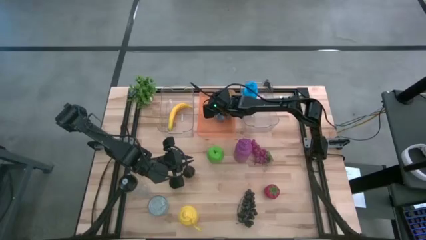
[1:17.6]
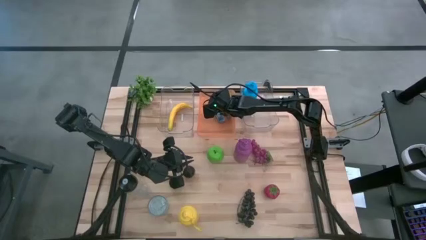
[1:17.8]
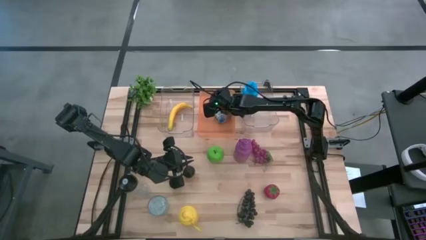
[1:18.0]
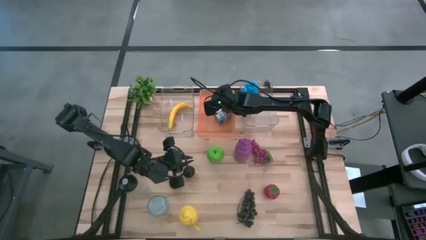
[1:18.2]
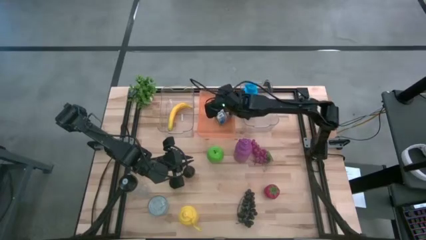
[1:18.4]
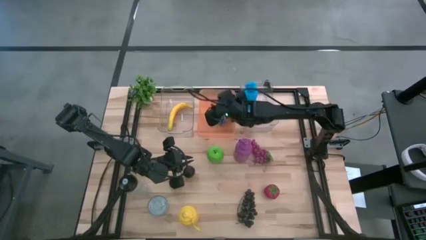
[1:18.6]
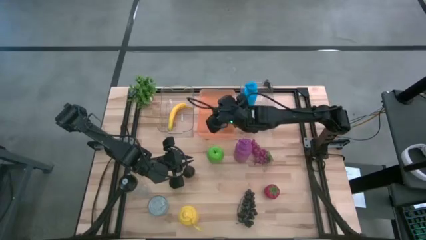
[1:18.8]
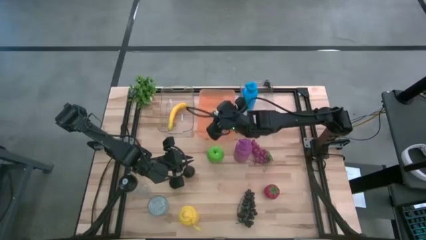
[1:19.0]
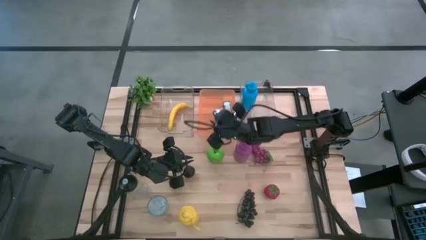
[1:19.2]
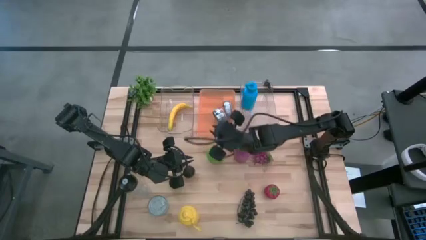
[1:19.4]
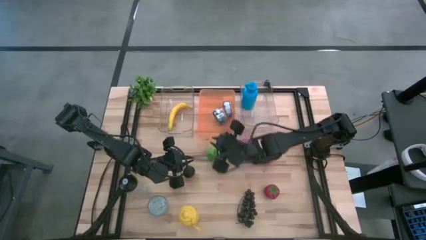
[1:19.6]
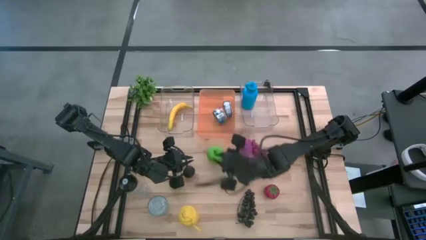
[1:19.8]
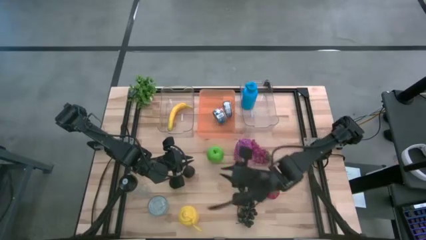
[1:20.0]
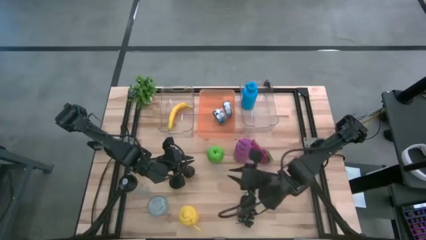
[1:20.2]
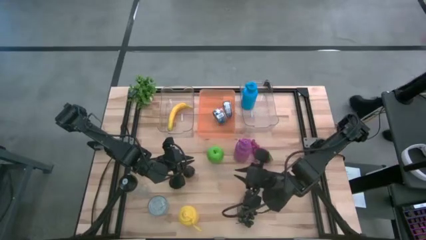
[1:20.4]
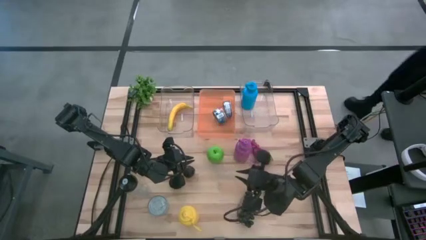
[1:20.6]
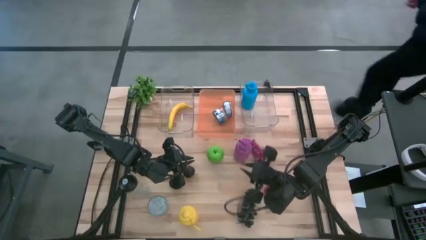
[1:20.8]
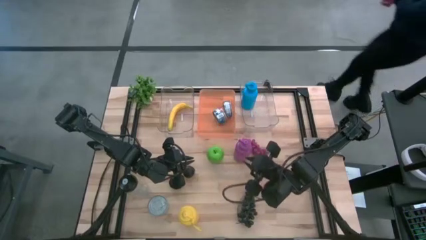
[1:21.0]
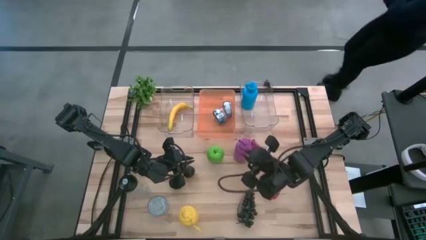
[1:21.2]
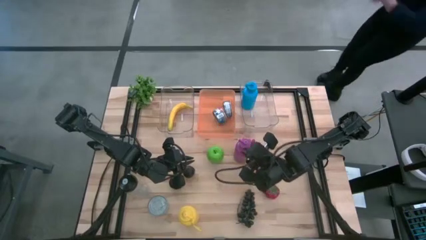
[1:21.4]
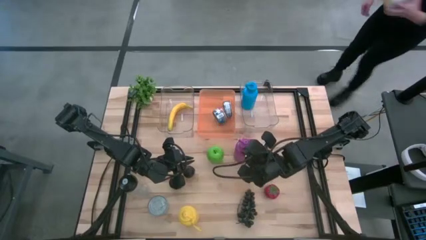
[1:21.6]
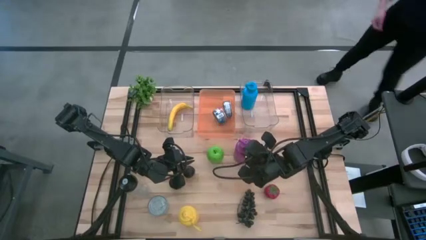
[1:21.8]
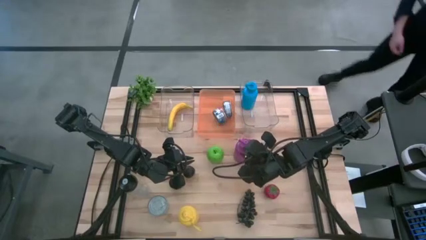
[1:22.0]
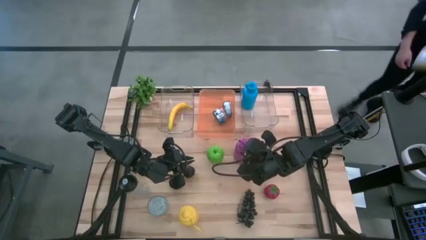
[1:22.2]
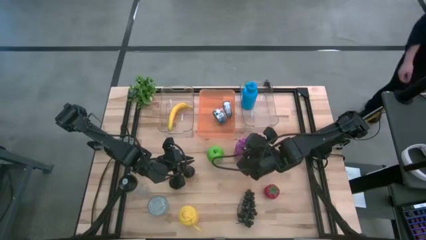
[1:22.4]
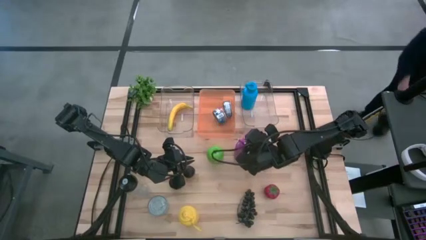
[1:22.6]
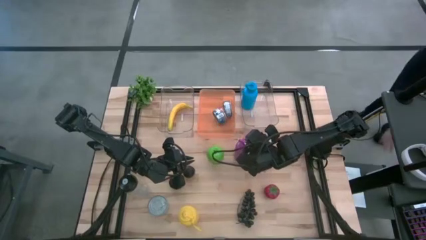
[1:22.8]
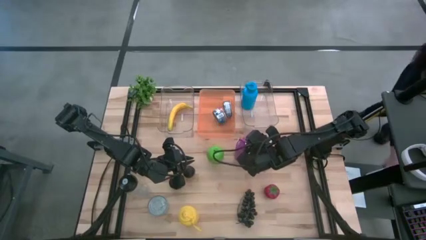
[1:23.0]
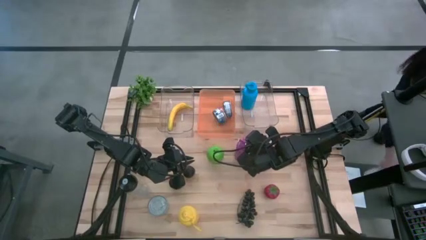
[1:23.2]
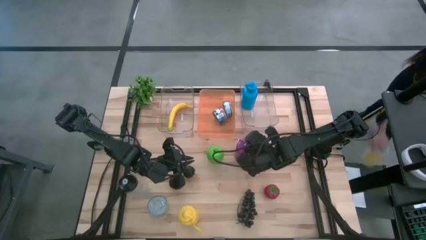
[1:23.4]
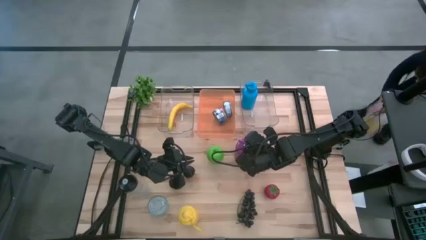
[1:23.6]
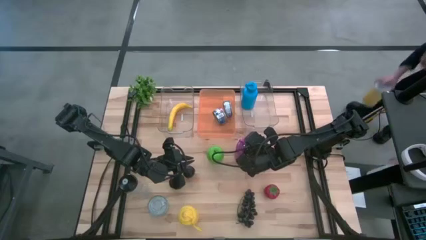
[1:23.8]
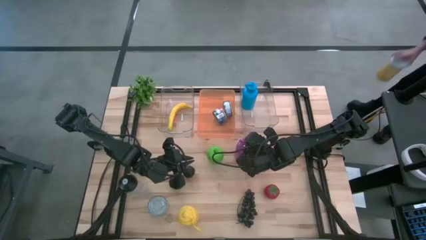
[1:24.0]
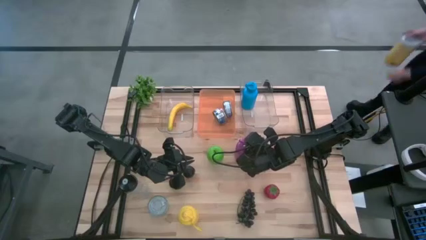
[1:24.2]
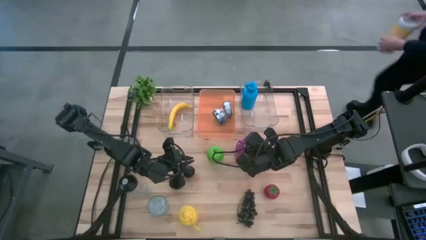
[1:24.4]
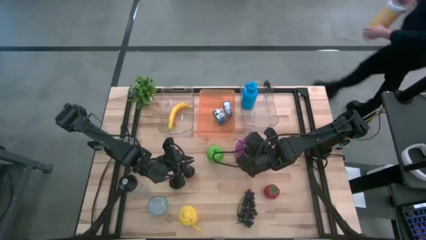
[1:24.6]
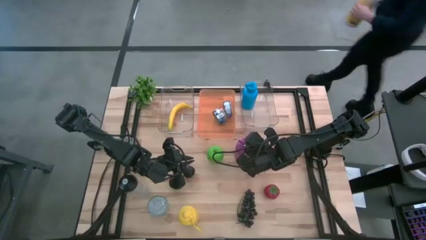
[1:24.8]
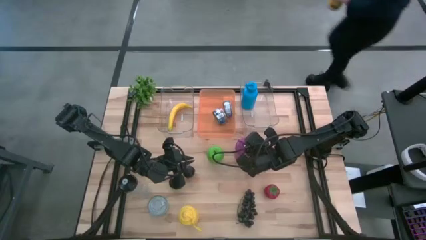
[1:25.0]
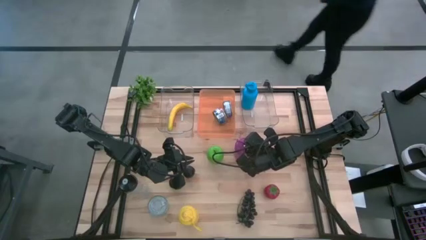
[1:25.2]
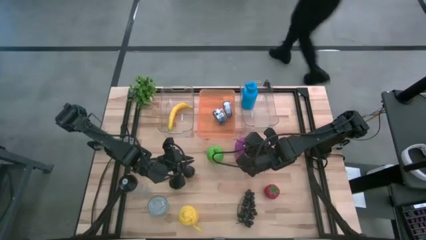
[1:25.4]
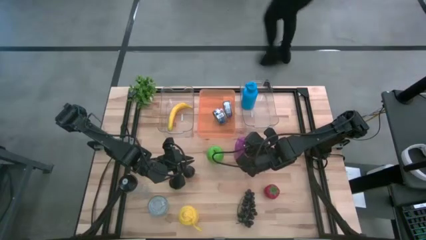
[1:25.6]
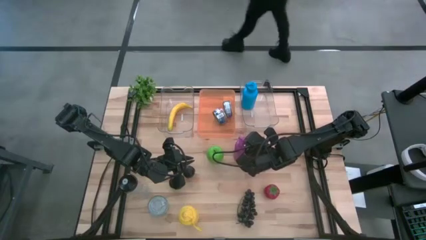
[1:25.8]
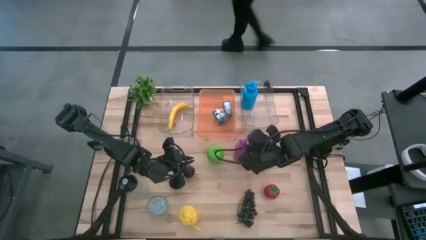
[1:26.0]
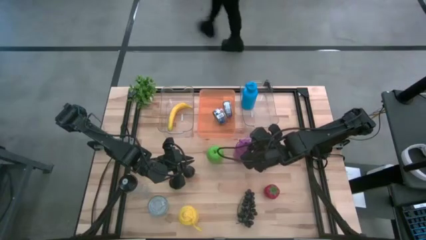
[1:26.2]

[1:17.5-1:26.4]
Task: Pick & Place Food Item
Put the violet water bottle into the right transparent bin

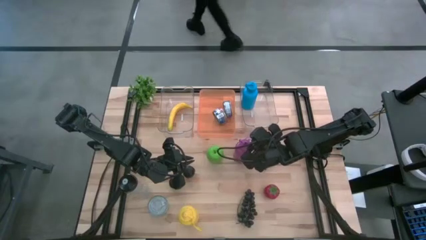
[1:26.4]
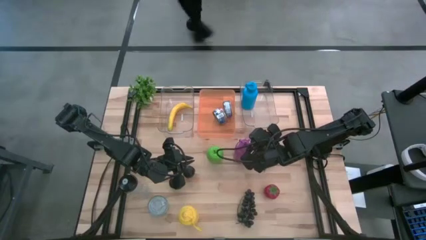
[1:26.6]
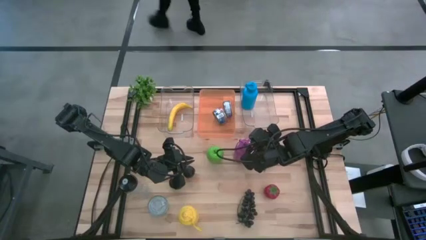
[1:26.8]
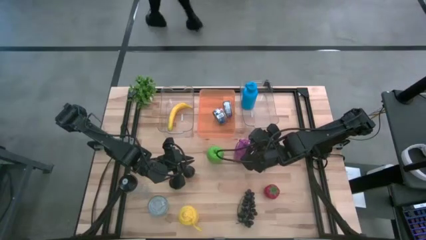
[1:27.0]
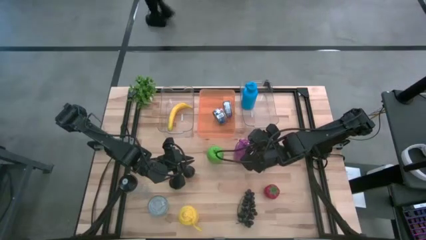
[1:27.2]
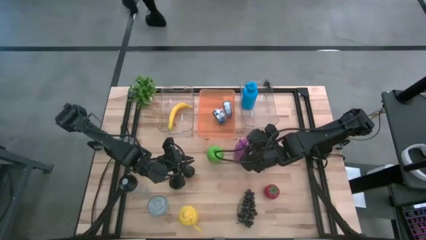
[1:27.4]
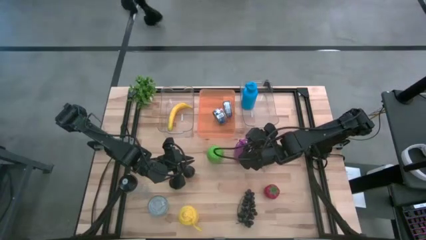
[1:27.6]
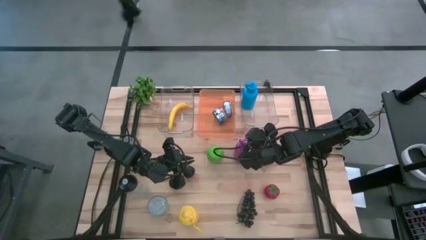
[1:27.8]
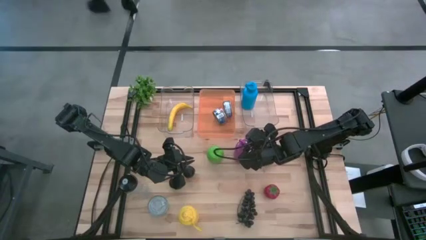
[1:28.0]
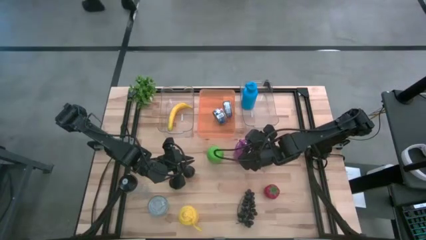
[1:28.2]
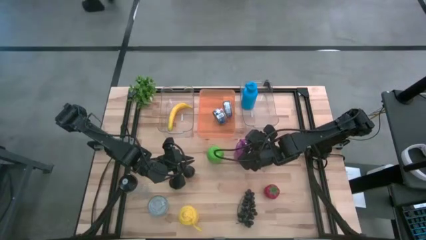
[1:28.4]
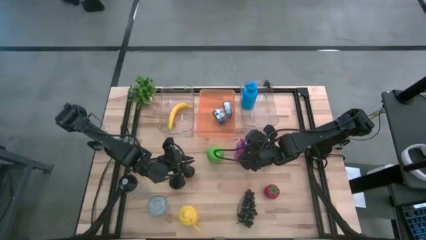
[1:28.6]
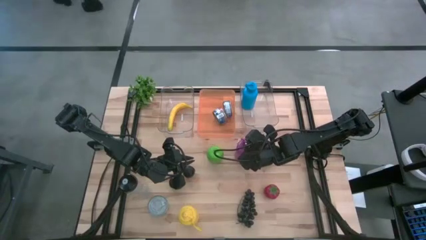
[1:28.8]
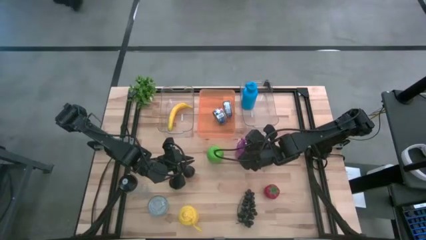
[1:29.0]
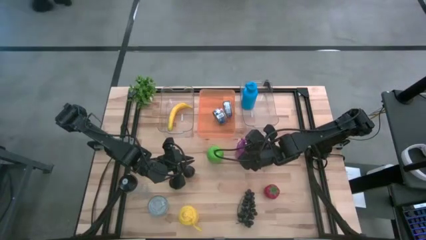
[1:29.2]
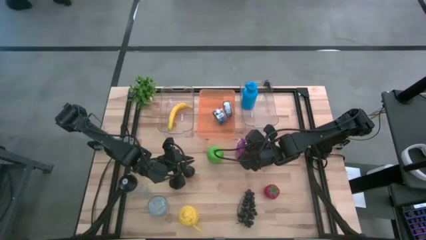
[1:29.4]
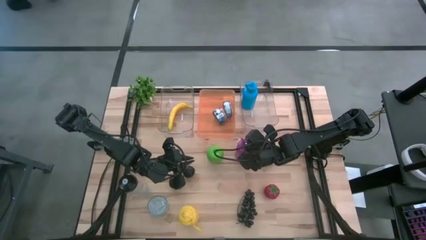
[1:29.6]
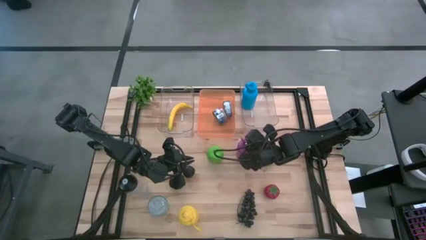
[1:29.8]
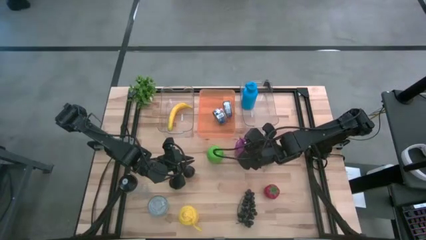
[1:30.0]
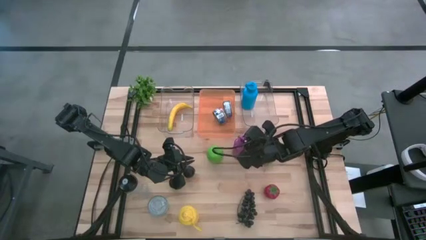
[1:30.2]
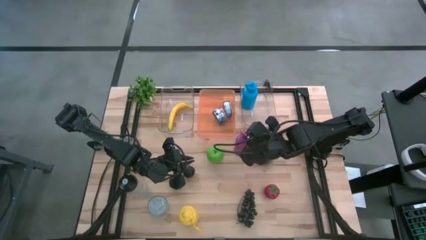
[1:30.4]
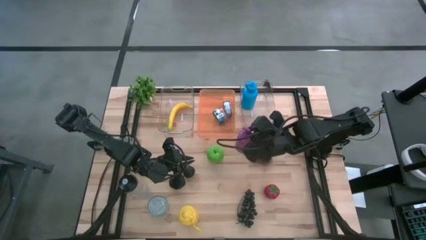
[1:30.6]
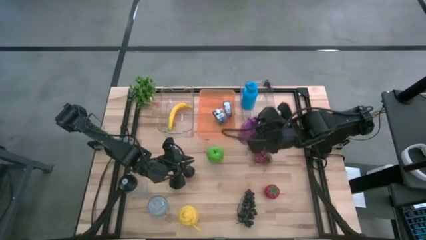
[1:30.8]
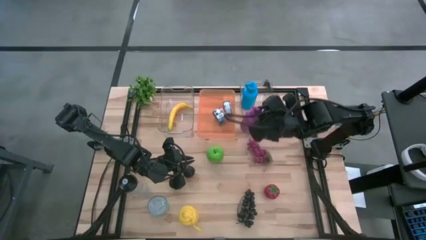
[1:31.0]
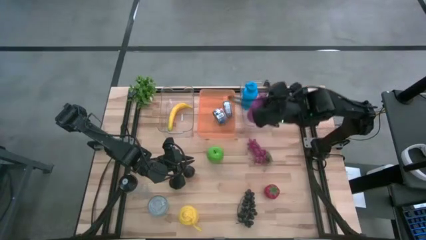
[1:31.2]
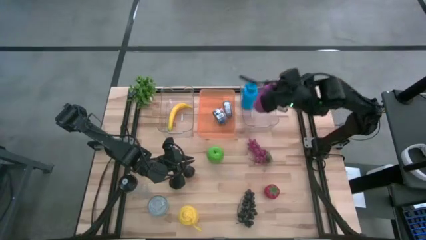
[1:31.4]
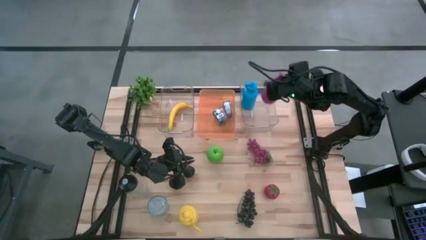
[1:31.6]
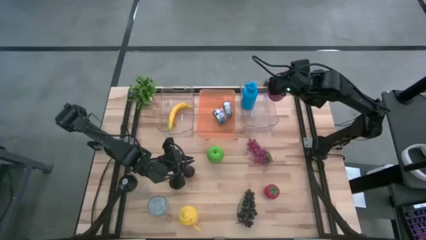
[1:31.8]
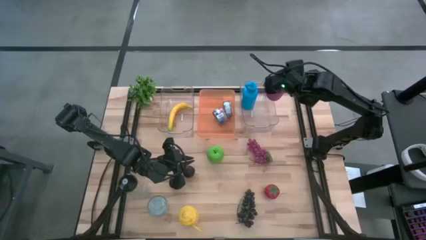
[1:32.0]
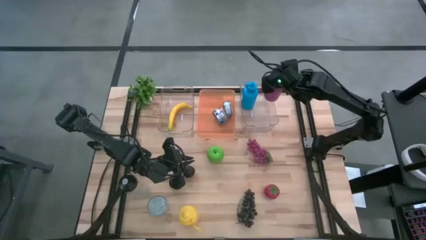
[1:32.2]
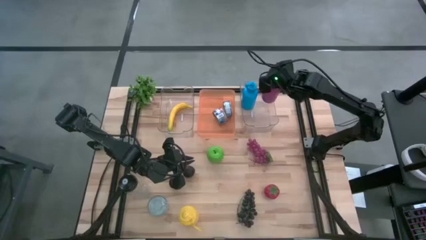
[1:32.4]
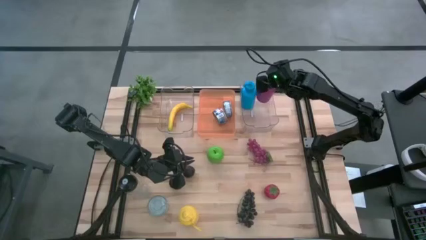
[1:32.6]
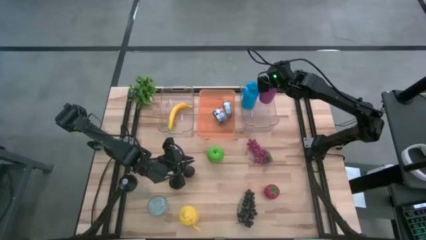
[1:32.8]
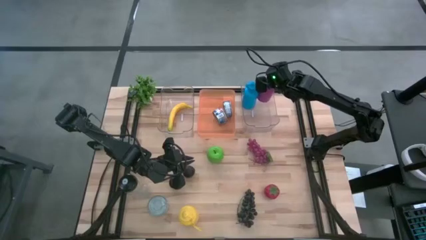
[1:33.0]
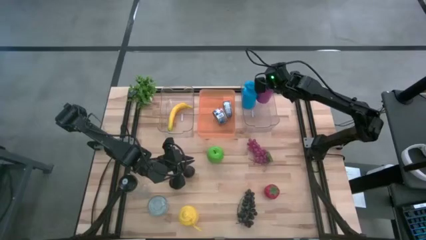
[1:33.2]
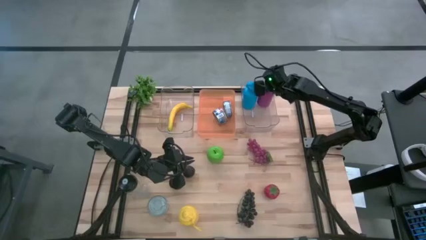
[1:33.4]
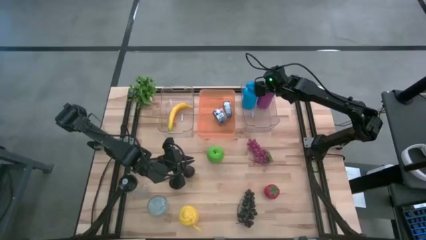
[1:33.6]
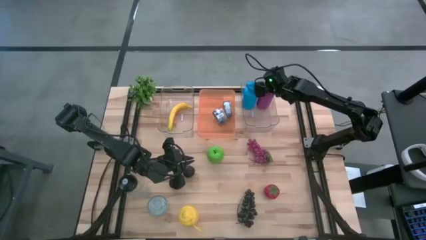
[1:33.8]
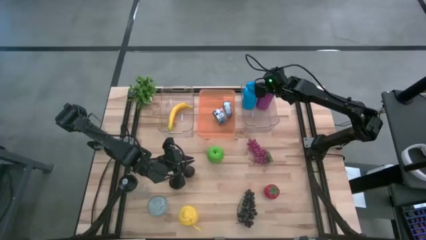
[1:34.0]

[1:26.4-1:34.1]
Put the violet water bottle into the right transparent bin
